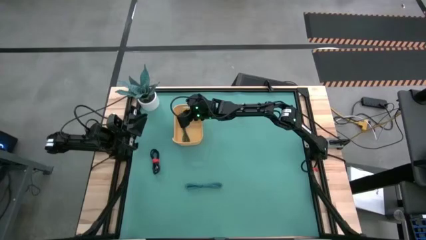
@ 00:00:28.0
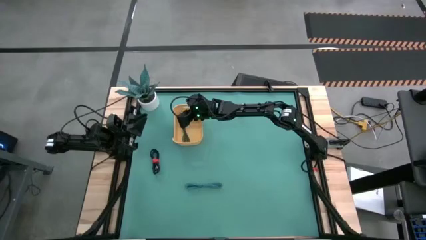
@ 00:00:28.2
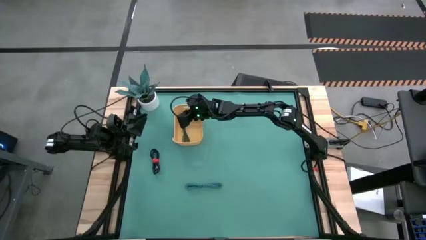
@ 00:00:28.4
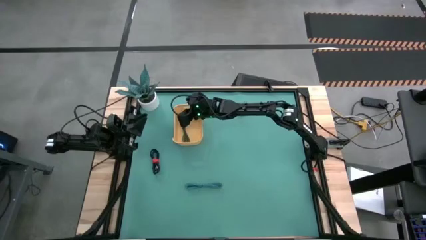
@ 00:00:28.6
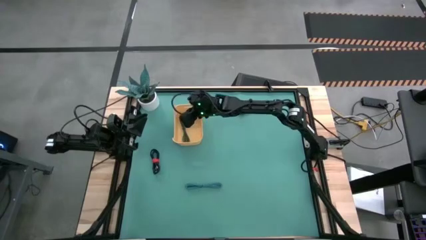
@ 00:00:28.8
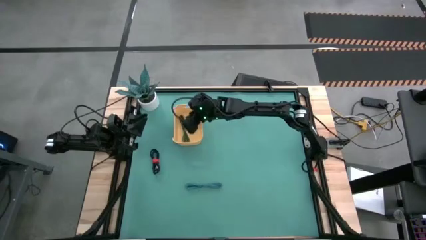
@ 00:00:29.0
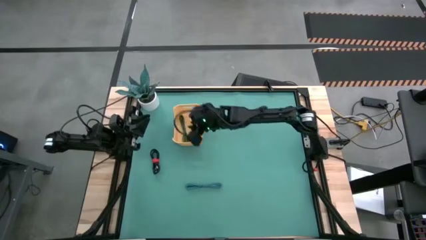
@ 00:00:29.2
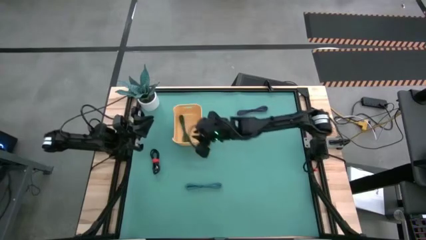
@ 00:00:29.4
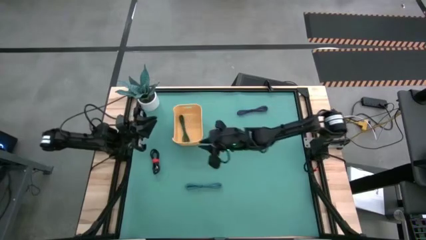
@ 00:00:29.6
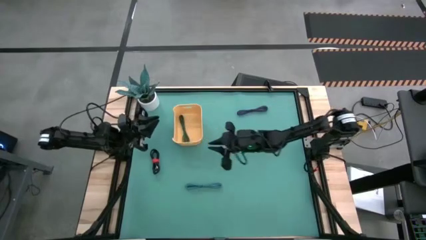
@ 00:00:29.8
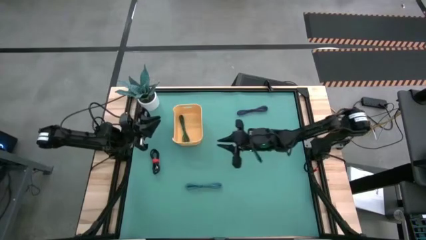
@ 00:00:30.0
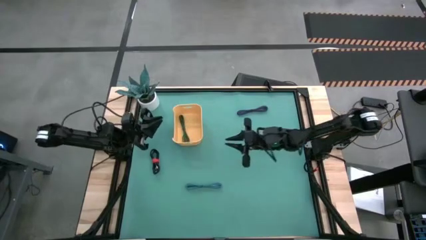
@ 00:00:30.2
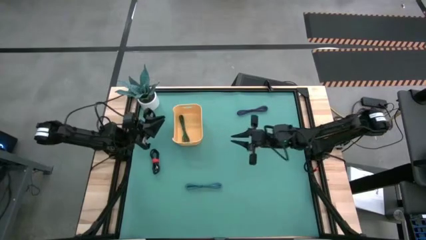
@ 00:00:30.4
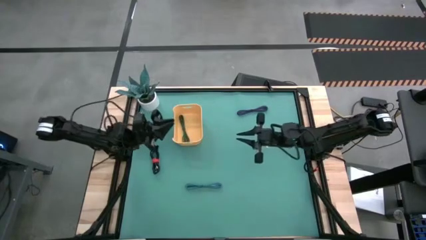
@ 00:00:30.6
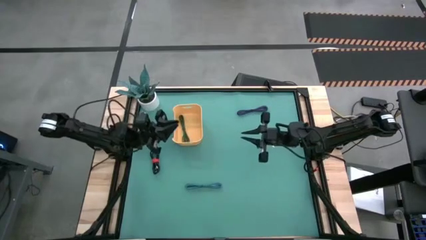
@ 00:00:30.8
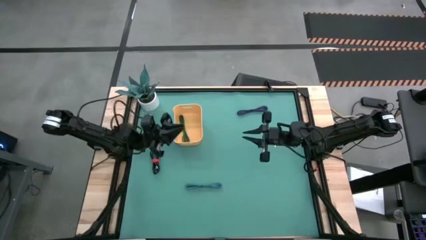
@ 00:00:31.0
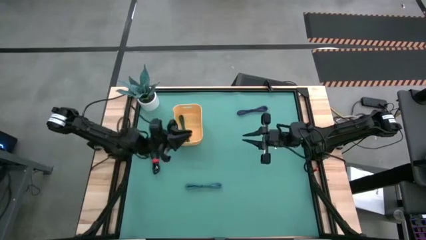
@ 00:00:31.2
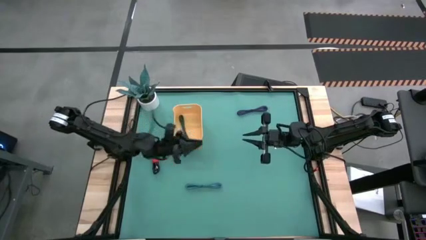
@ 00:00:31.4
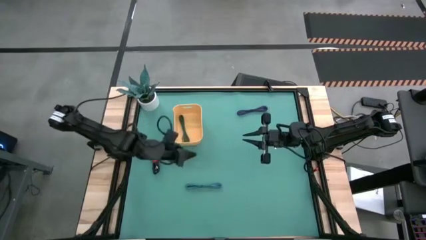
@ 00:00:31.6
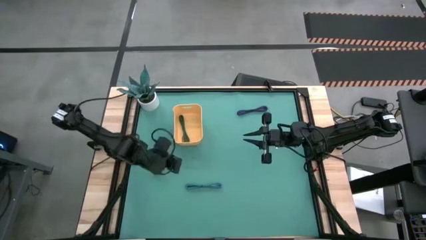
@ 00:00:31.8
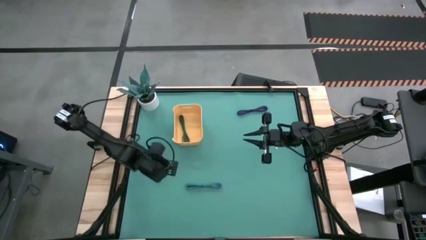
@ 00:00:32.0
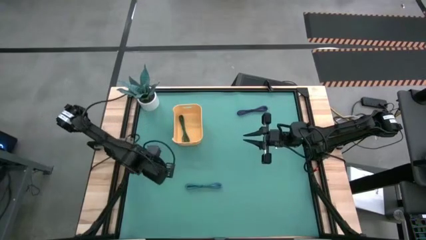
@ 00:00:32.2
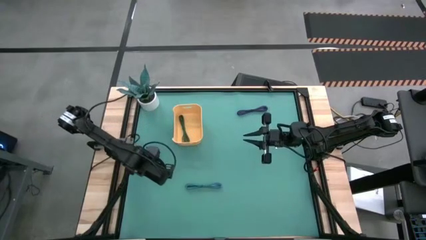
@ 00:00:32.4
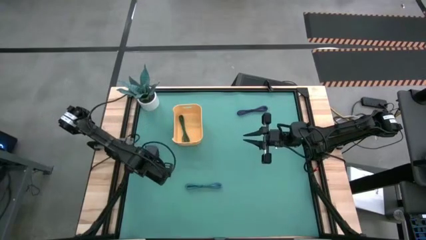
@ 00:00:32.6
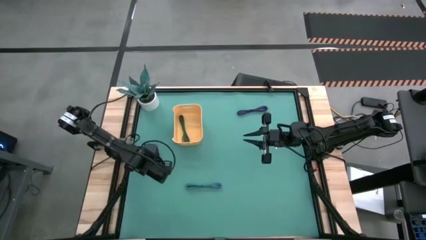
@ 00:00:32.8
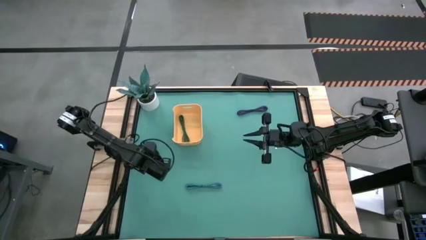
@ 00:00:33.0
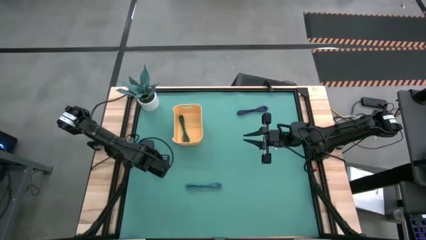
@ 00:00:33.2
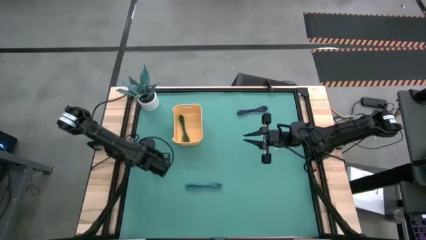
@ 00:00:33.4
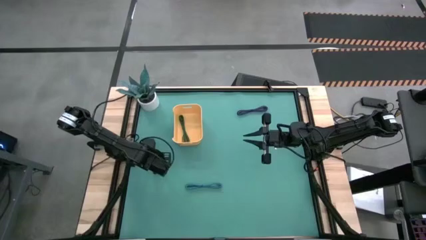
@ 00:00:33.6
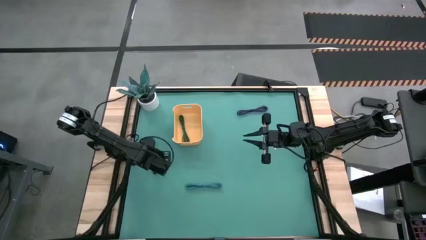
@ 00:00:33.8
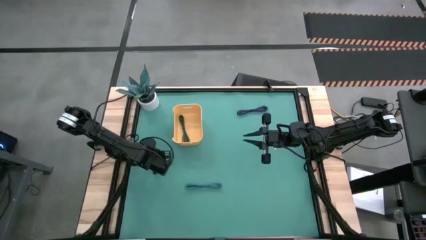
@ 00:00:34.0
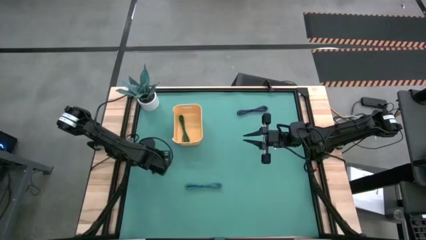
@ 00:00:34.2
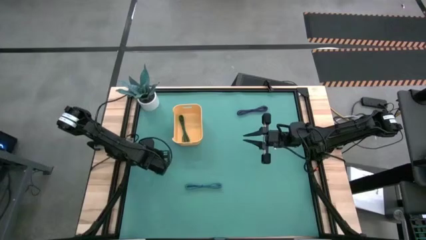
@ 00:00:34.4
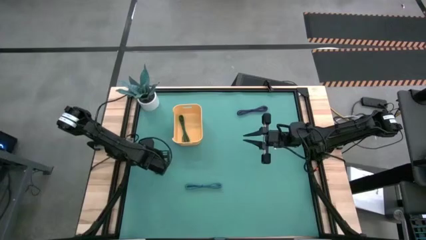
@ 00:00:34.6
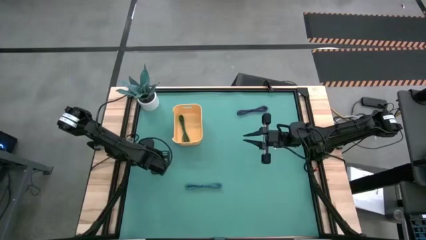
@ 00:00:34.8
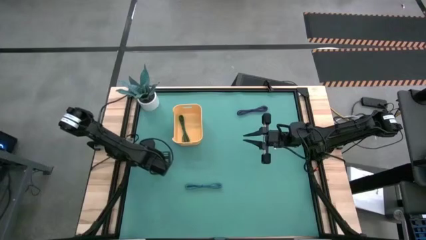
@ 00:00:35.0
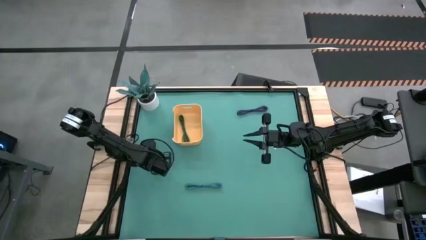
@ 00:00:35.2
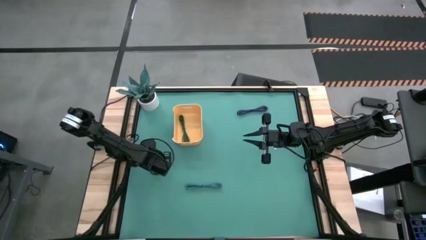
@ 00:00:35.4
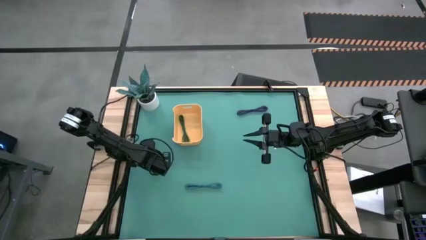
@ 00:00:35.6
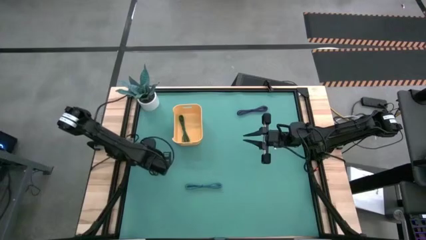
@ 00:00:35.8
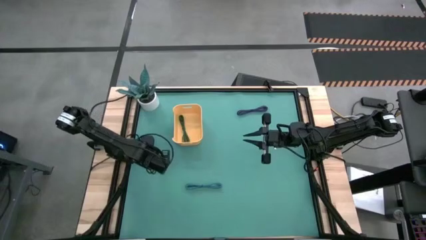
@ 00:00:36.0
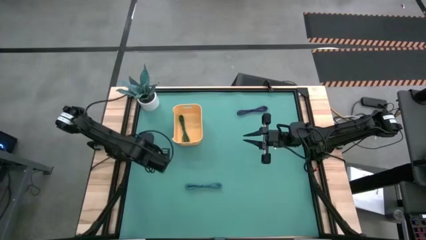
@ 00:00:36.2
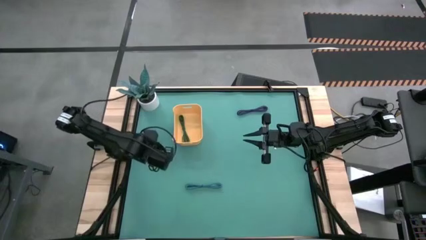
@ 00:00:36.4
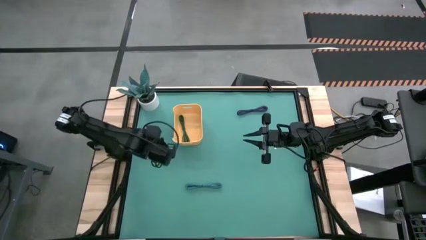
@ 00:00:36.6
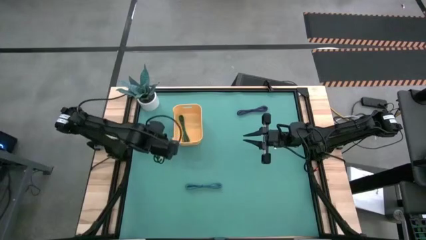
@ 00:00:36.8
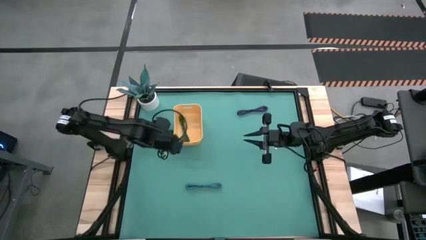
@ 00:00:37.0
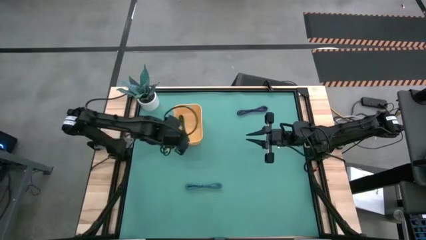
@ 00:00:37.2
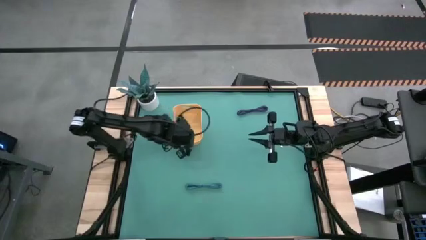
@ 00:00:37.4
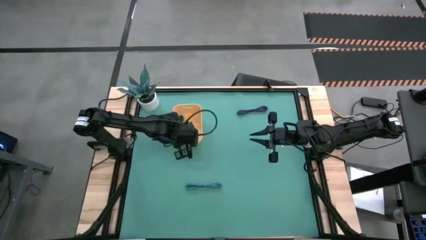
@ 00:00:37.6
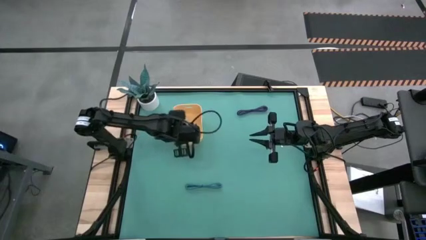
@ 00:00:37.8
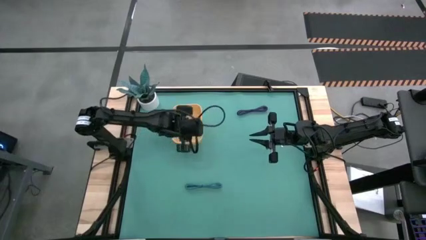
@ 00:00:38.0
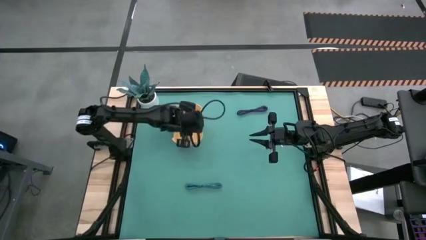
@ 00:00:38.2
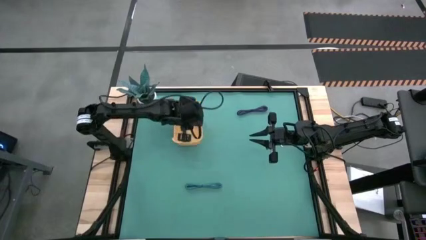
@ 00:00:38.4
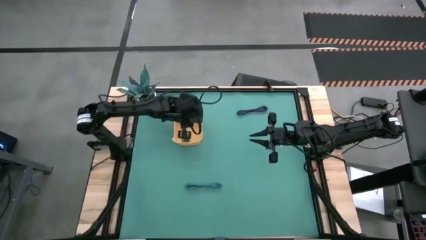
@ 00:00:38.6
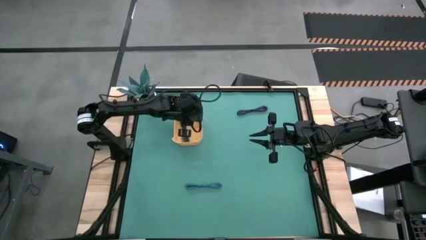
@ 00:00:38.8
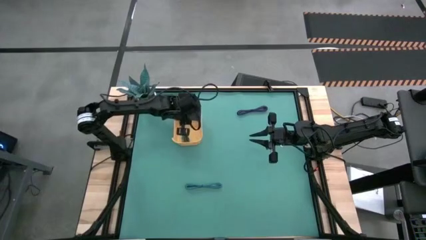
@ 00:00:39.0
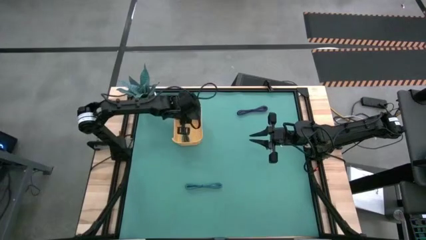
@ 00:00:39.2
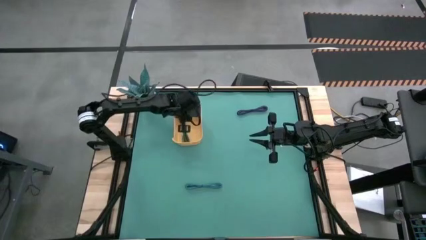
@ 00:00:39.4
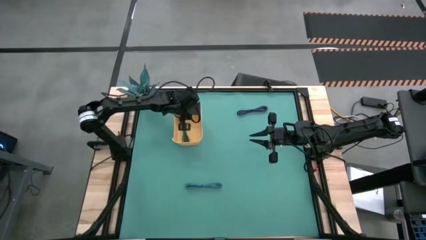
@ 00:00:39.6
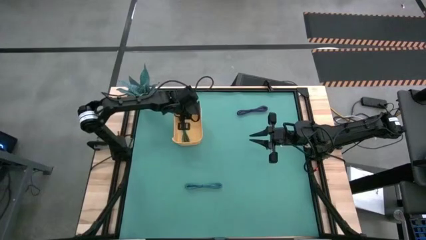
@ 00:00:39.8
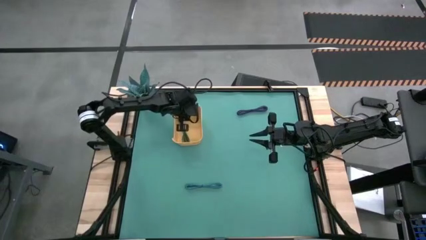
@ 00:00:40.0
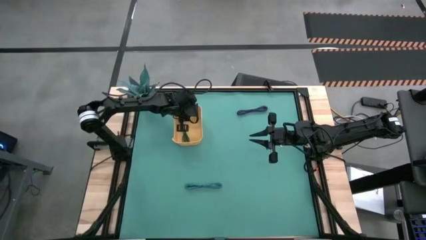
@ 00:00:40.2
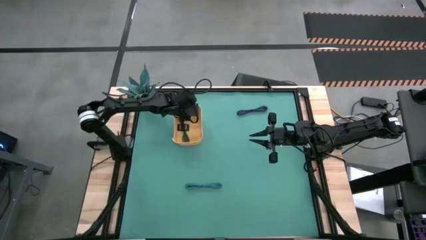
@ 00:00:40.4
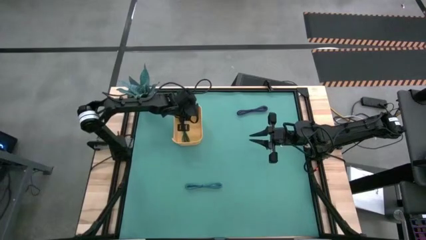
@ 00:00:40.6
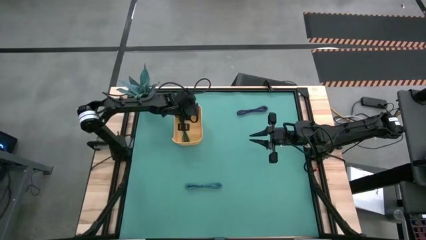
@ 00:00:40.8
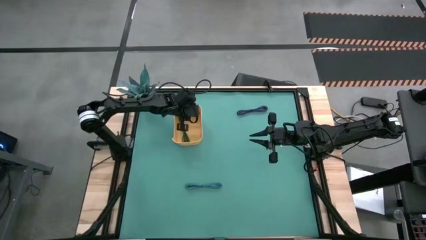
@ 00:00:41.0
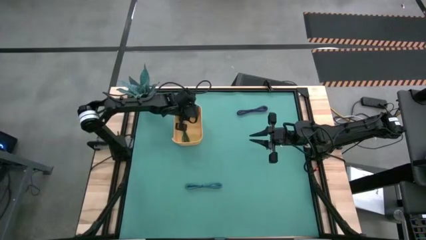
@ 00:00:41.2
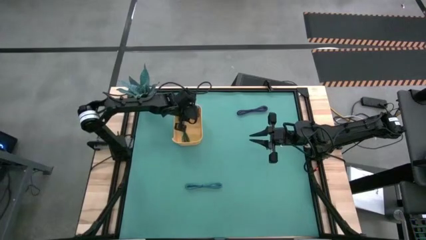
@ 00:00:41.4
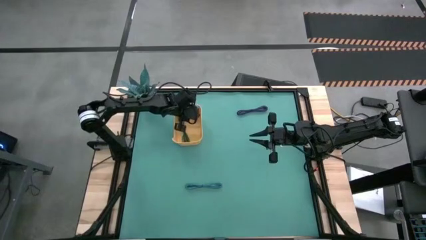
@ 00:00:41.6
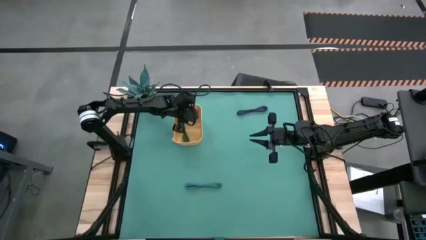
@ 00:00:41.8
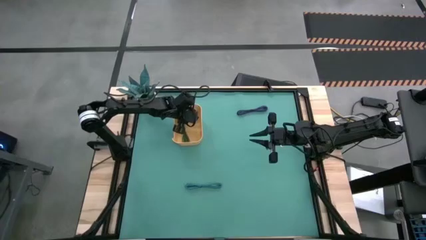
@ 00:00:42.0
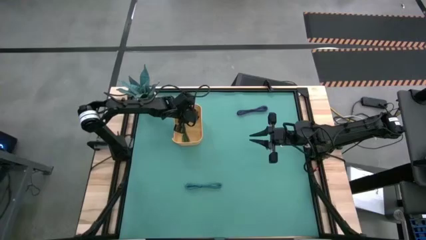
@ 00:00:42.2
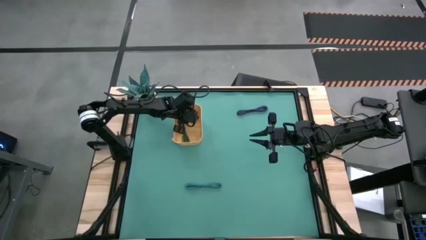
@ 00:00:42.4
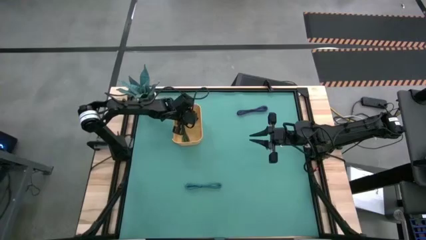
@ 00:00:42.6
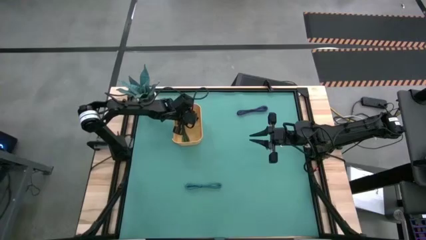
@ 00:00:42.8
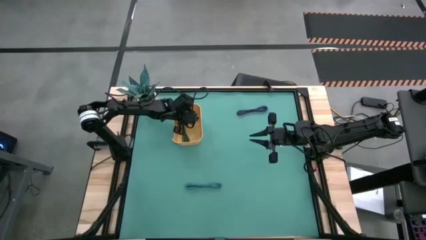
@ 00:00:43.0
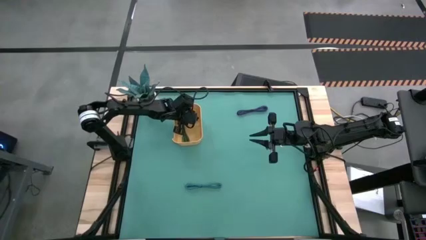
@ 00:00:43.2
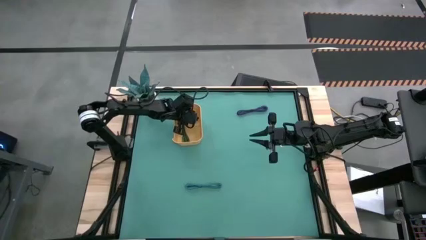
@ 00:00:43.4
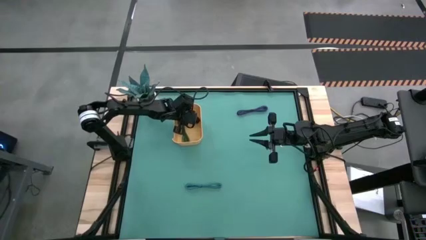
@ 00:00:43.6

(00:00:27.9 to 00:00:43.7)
Task: Pick and place USB-C Cables
Put the black USB cable into the yellow bin
